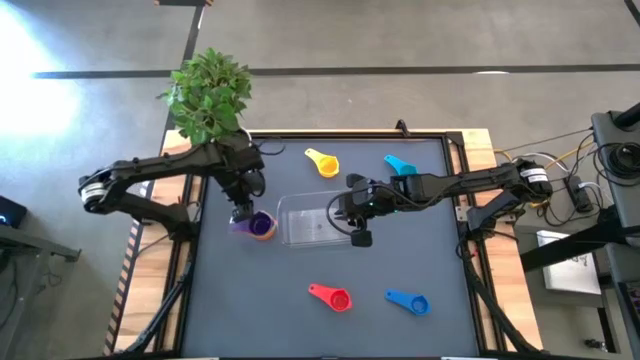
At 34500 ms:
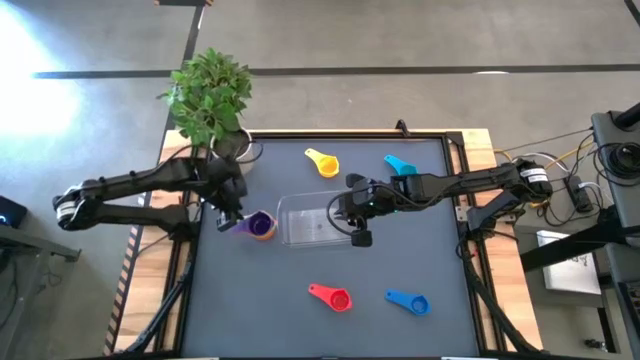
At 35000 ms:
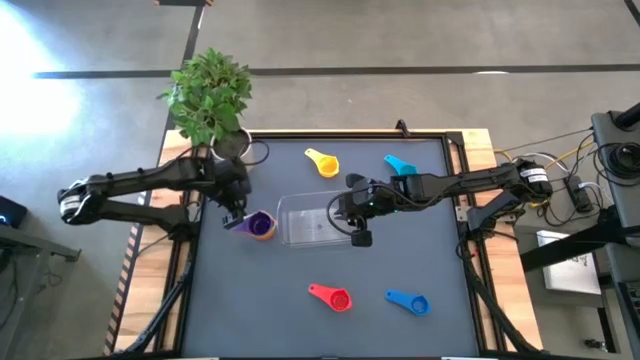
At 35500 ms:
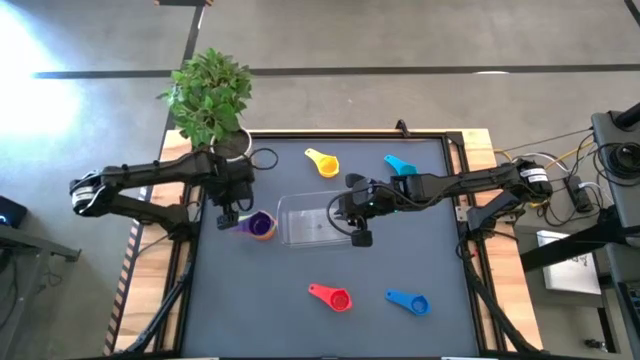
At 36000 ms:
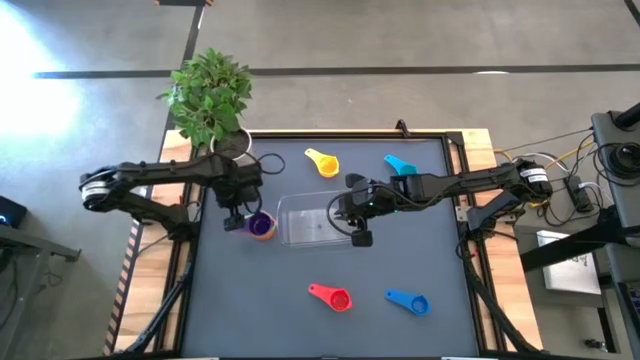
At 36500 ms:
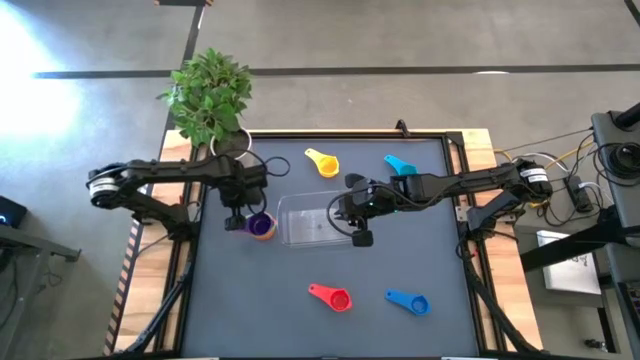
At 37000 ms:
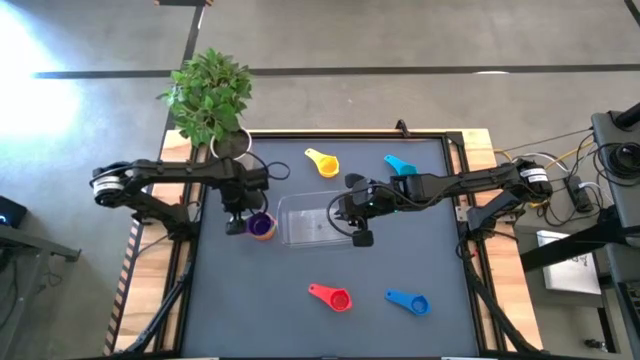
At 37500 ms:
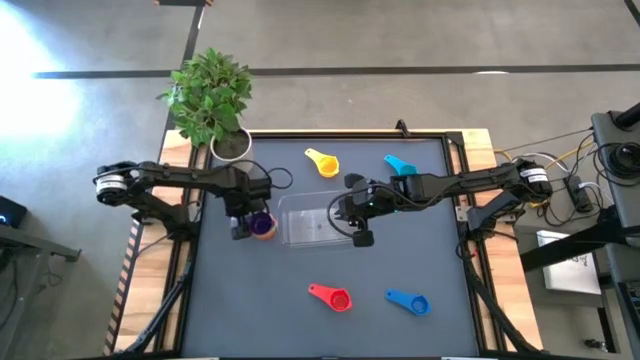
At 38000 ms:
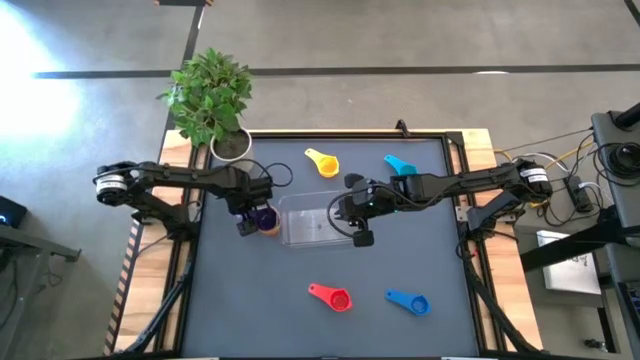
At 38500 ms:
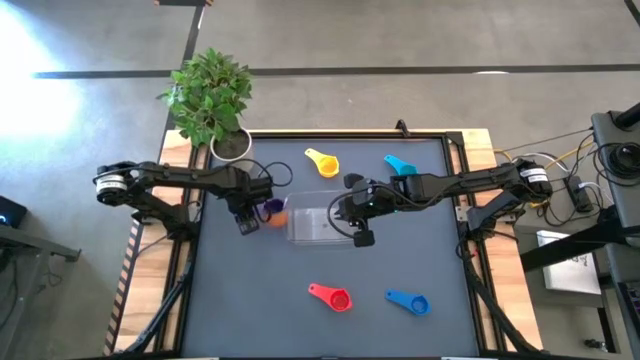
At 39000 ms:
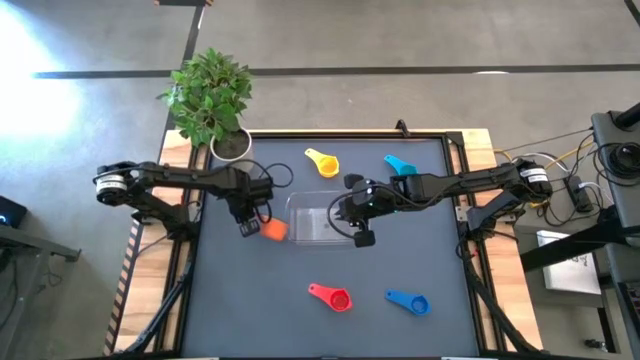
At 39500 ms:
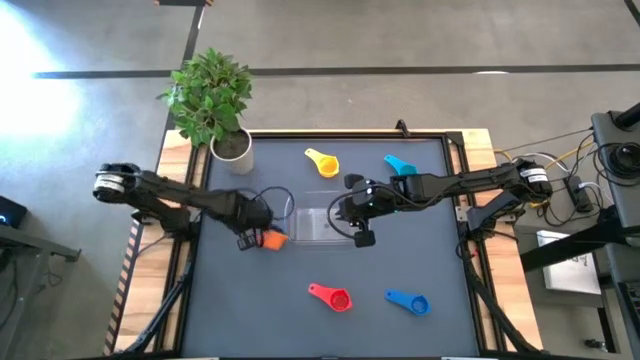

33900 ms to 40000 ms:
Task: Nest measuring cups in basket
Adjust the stacked measuring cups

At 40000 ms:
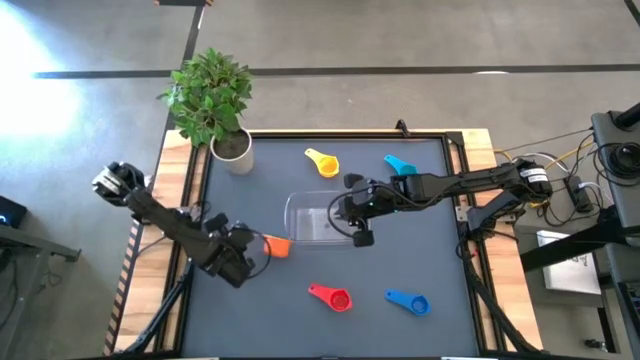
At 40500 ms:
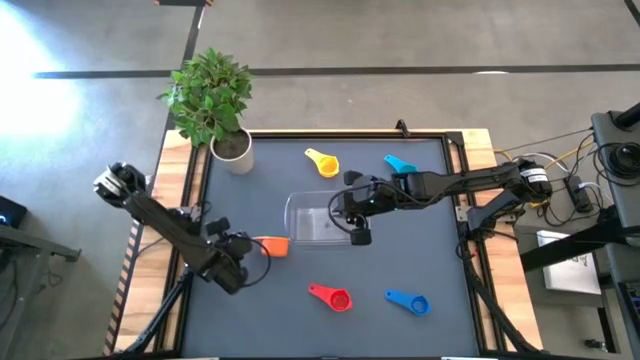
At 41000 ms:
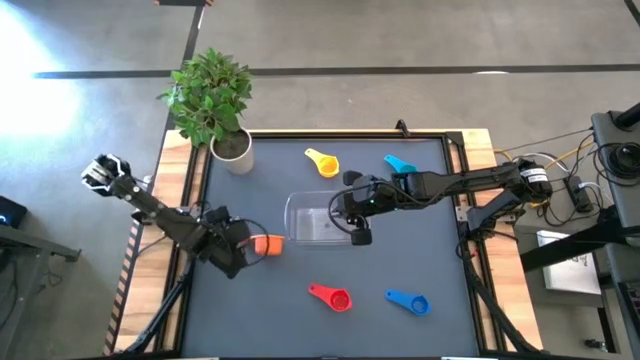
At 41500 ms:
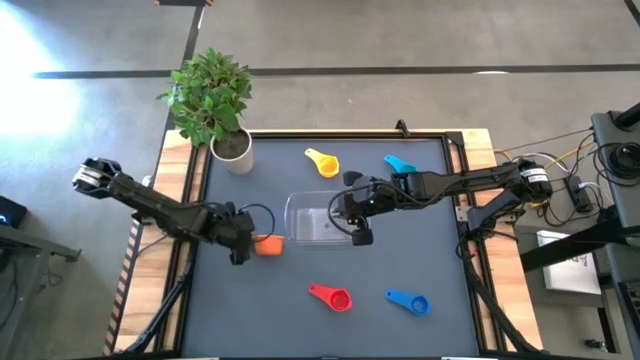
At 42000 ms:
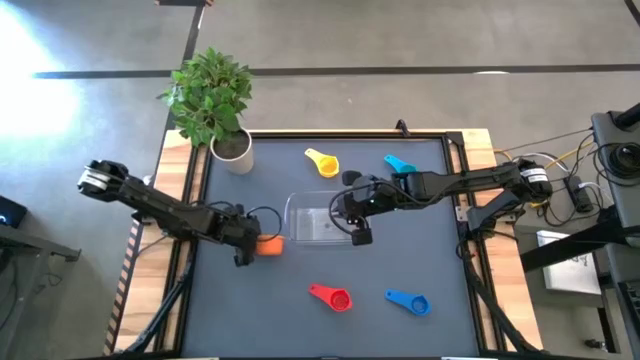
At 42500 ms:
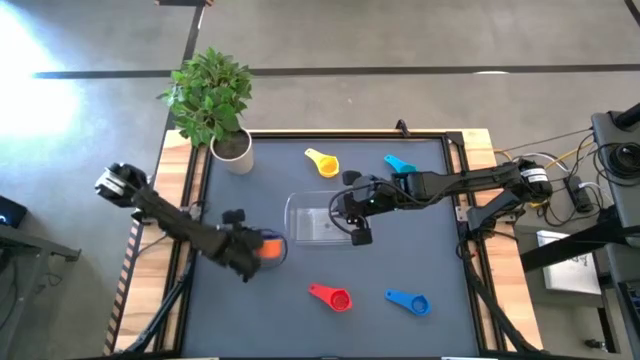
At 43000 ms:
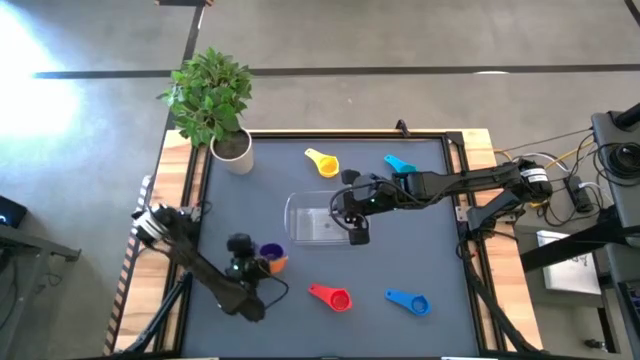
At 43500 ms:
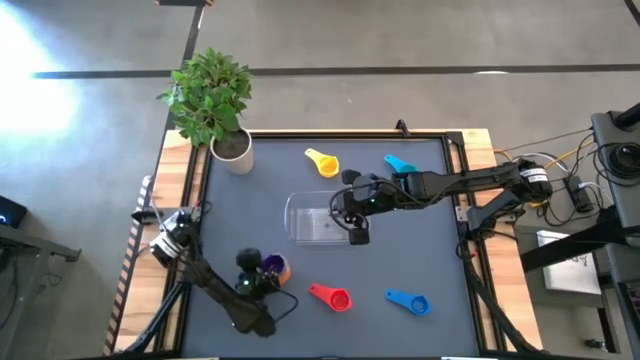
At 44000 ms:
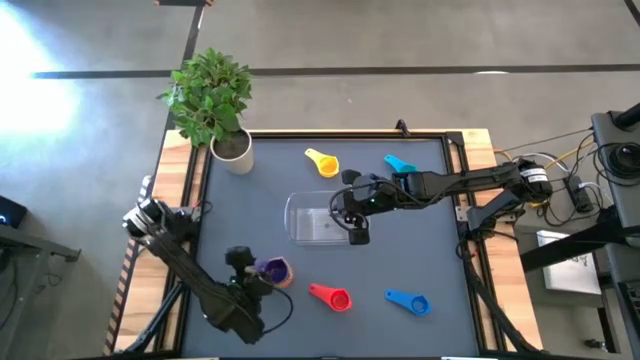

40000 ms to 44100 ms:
Adjust the stacked measuring cups

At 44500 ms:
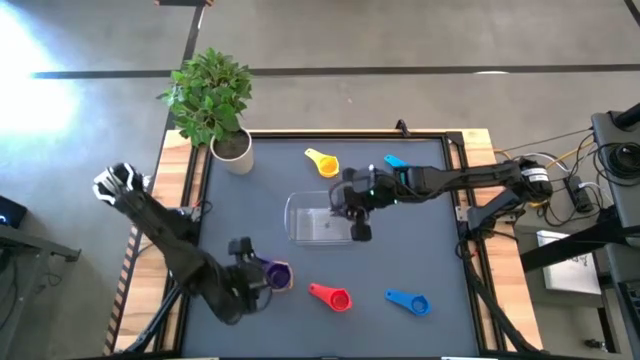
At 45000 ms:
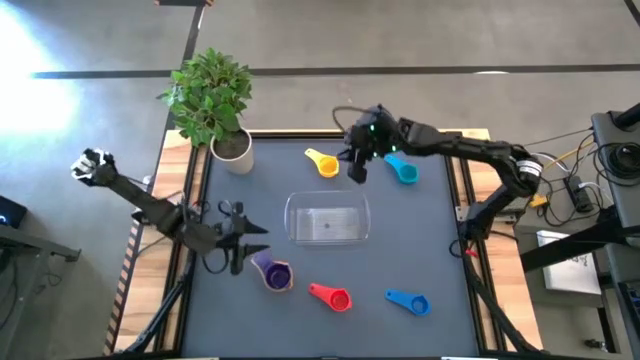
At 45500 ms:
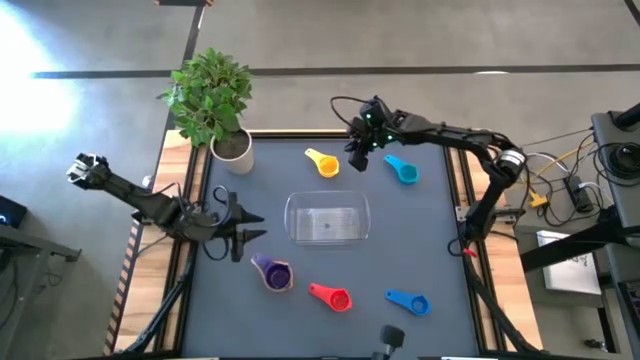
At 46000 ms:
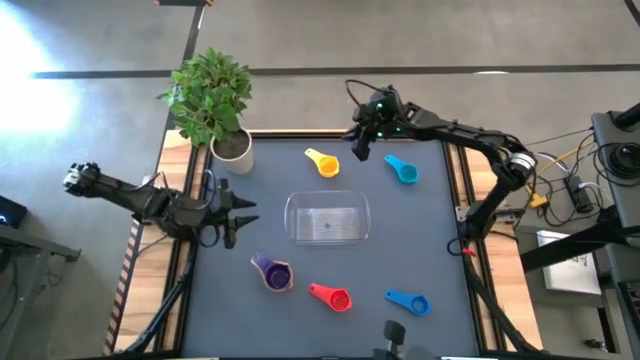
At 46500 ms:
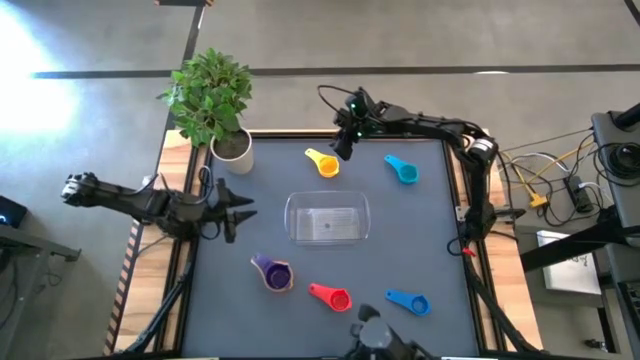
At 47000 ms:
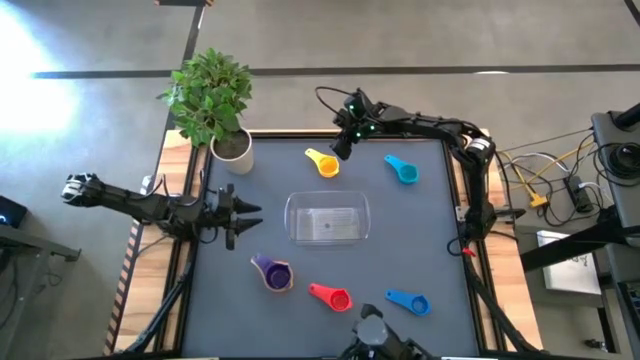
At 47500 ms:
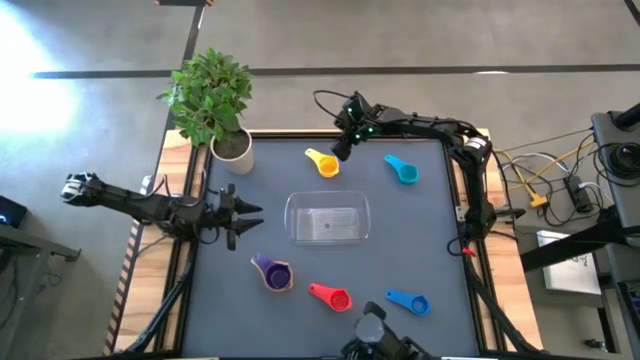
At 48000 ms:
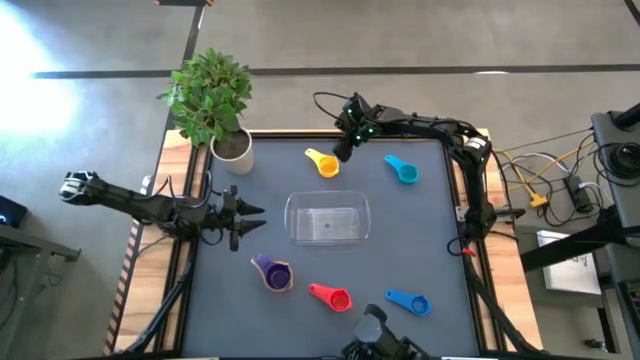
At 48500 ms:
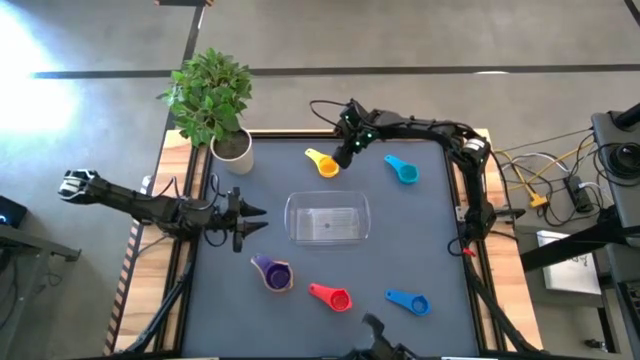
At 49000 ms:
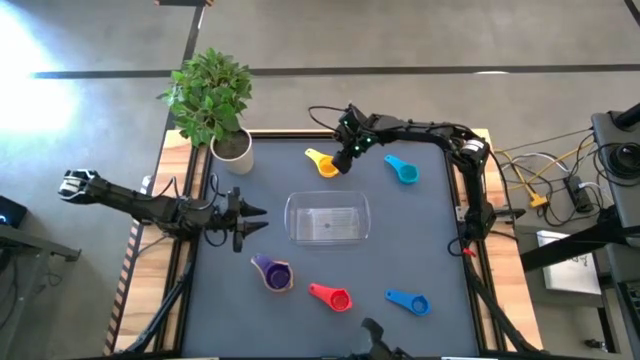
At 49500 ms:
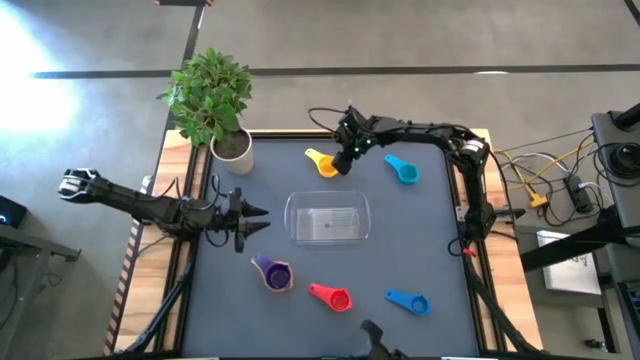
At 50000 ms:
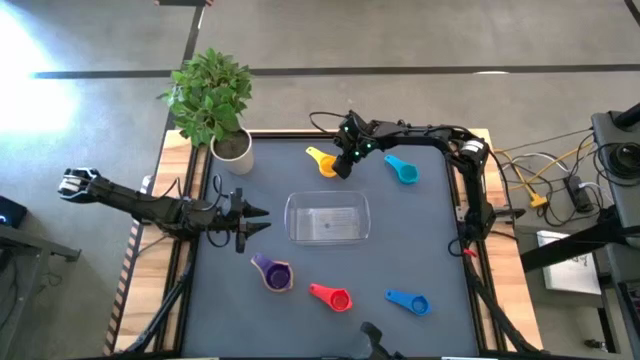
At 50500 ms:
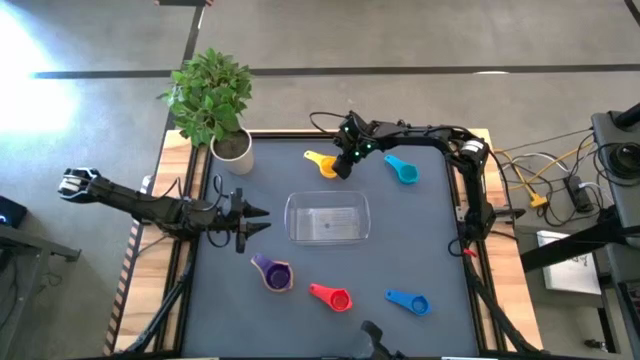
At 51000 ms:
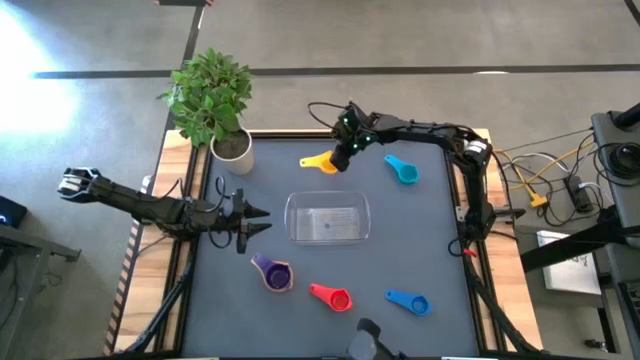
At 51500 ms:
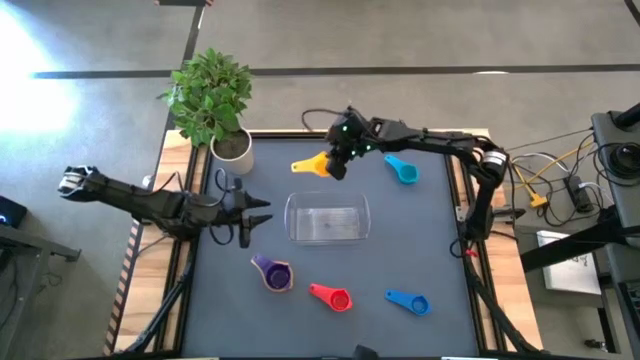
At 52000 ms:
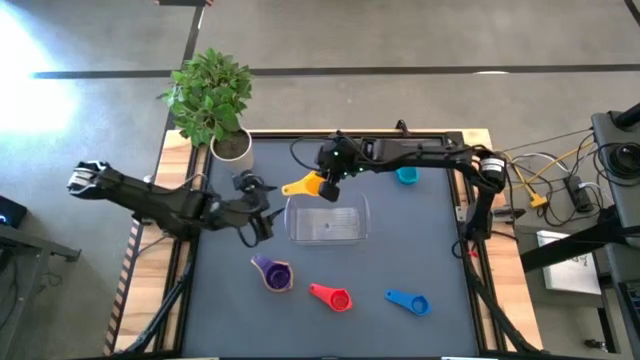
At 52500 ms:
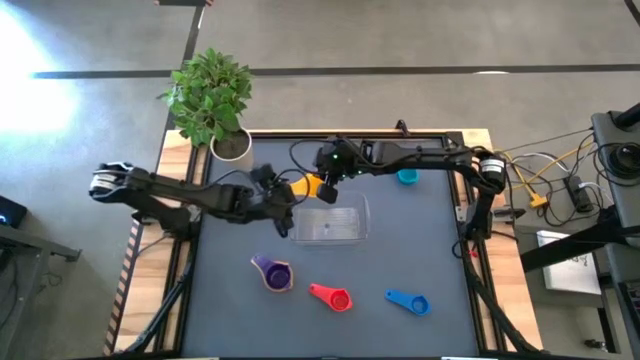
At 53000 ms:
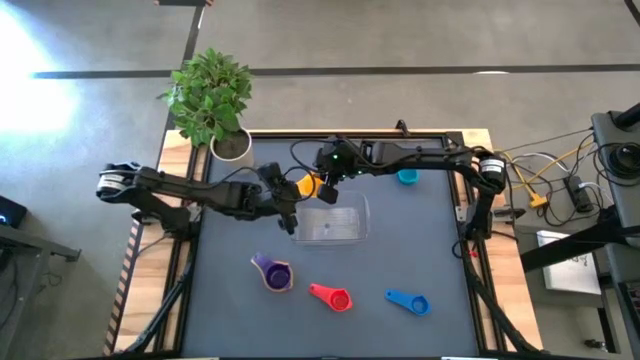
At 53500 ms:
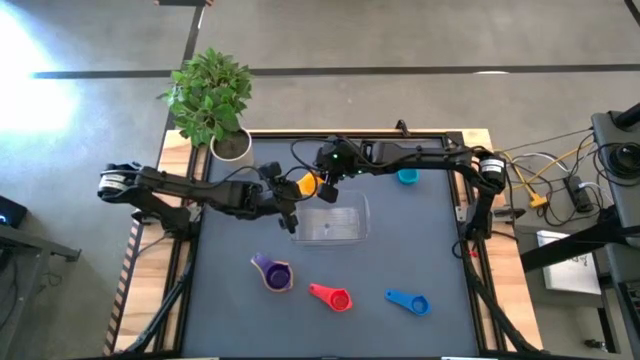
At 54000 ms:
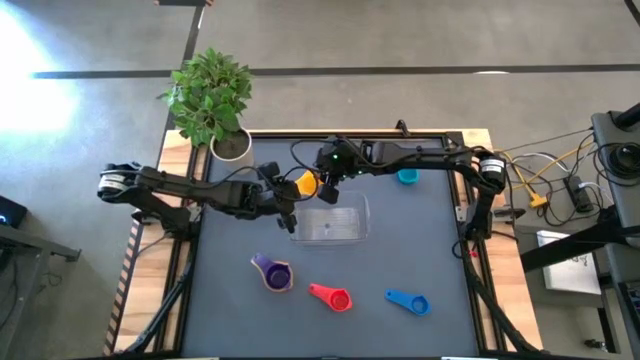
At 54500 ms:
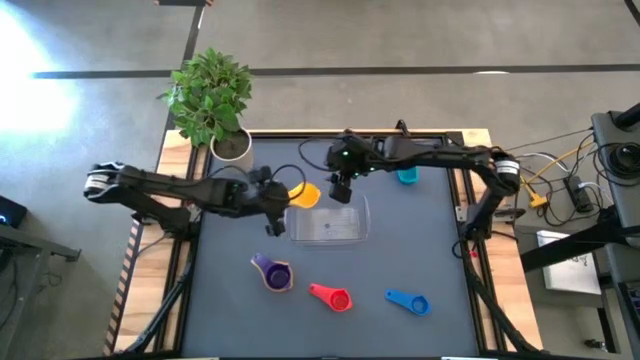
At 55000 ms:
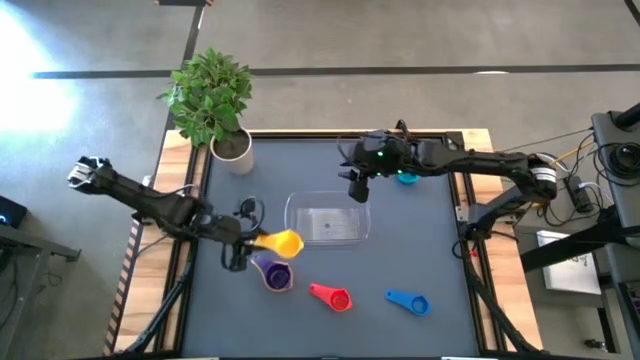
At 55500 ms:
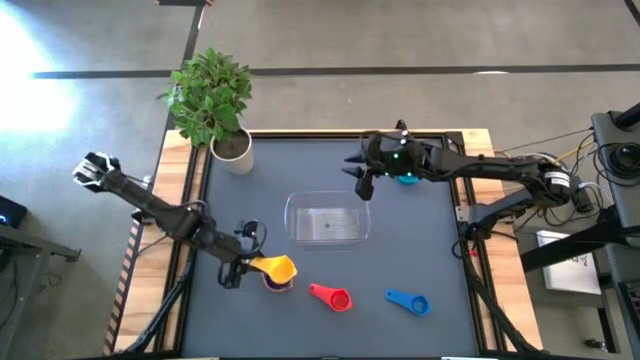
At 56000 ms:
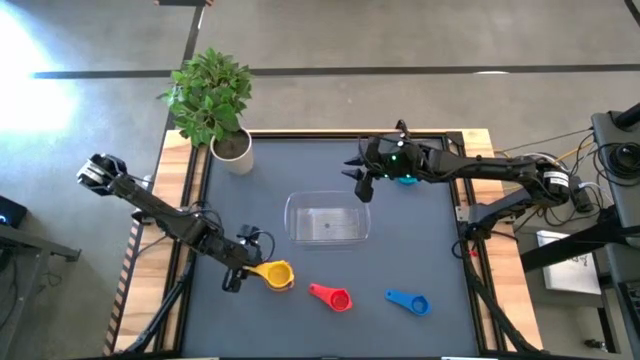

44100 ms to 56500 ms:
Stack the yellow measuring cup on top of the violet measuring cup
